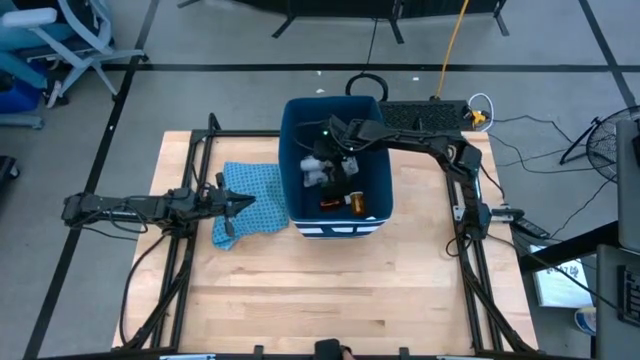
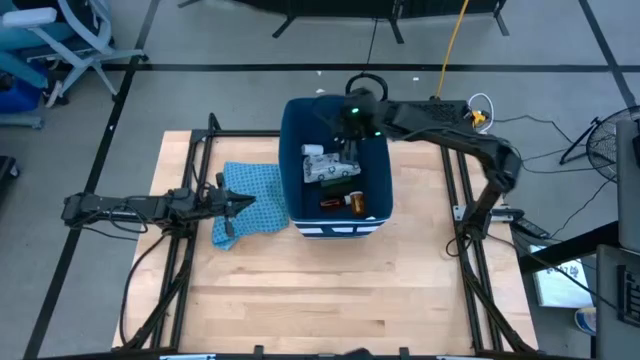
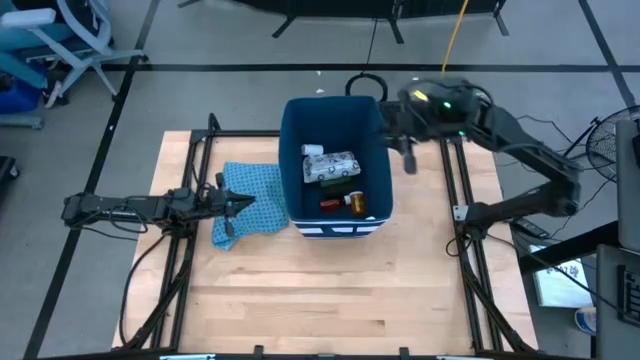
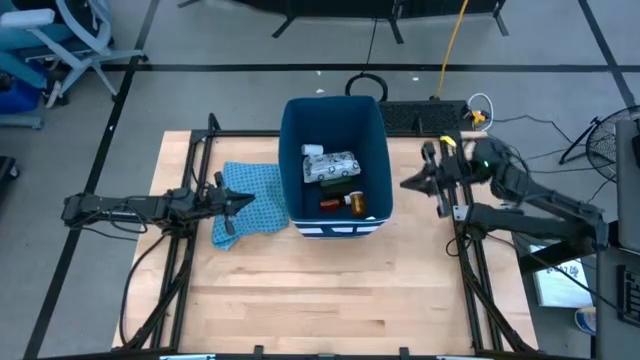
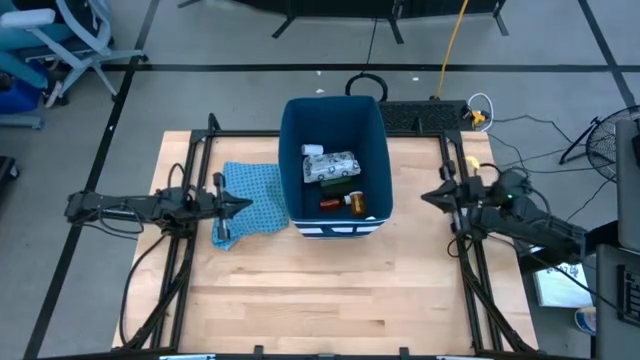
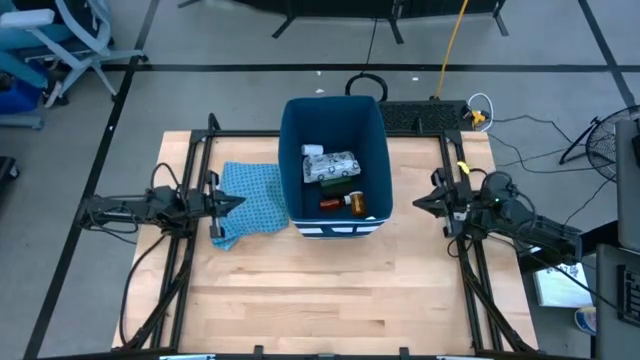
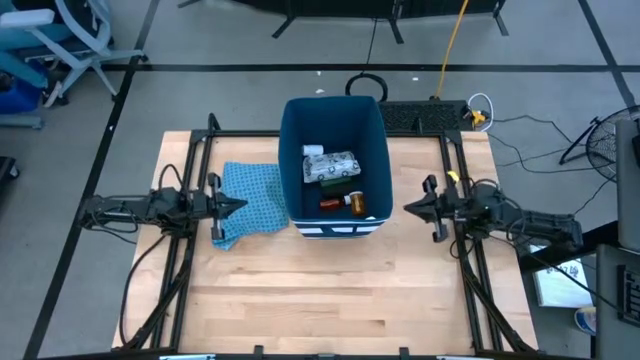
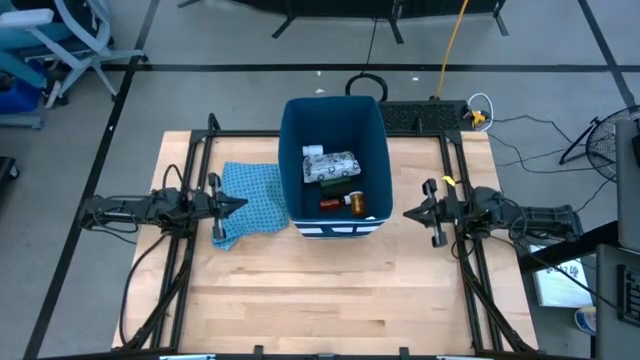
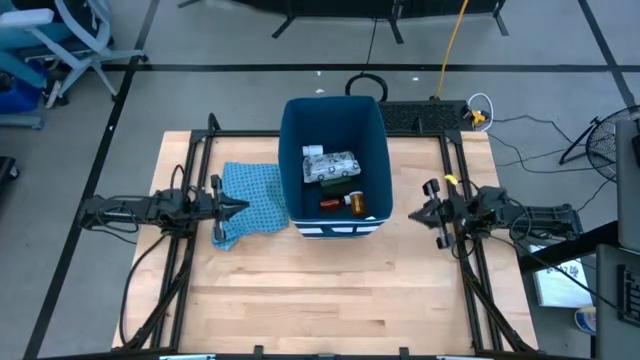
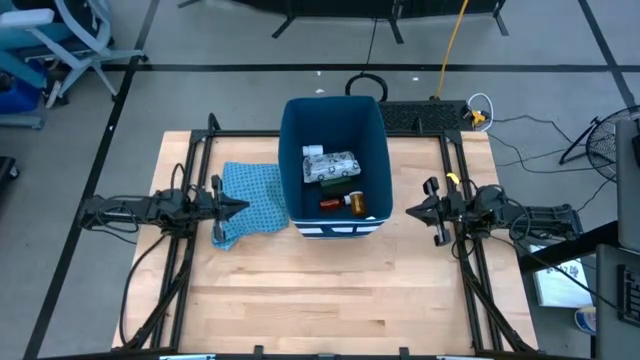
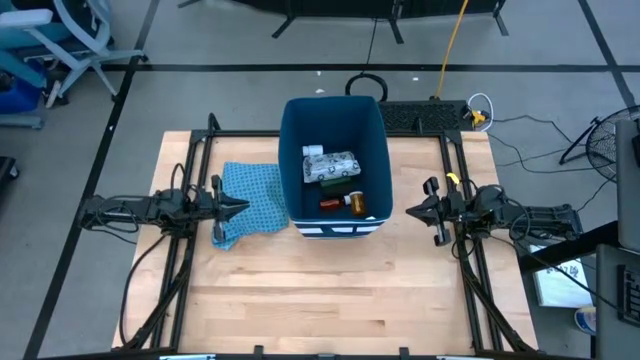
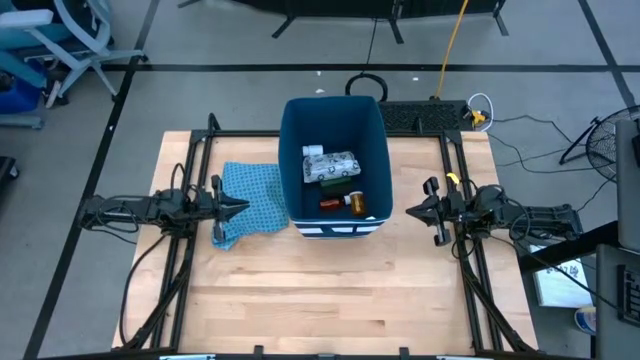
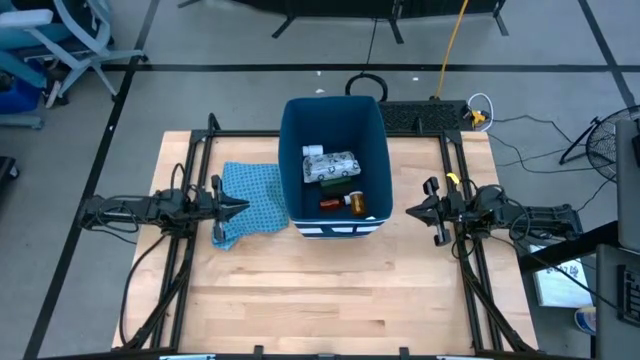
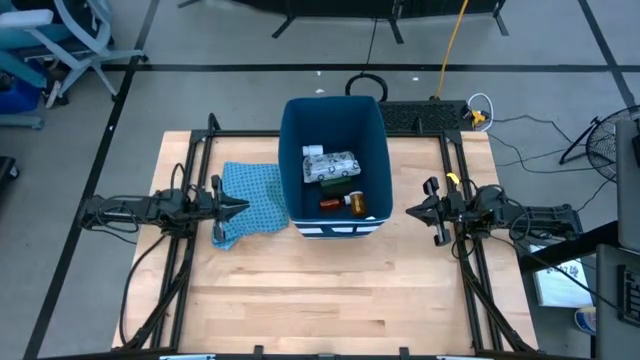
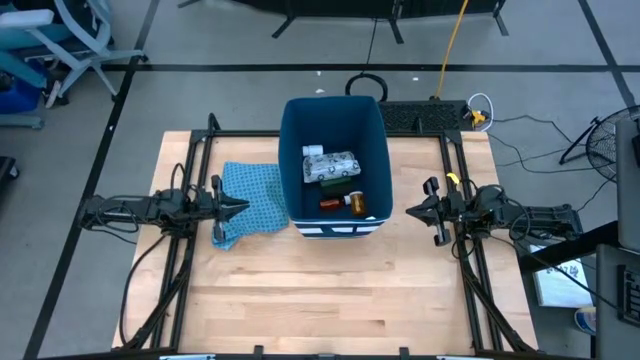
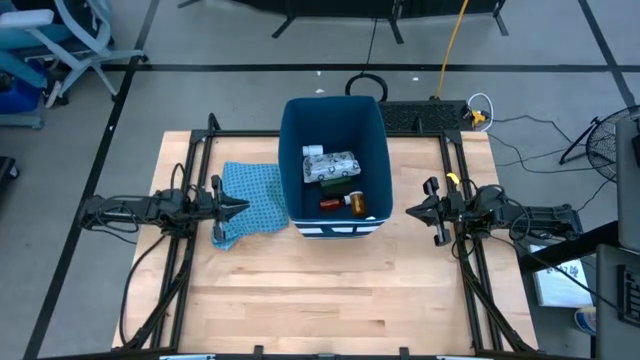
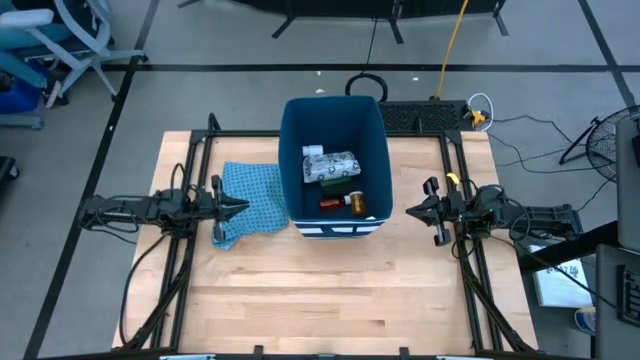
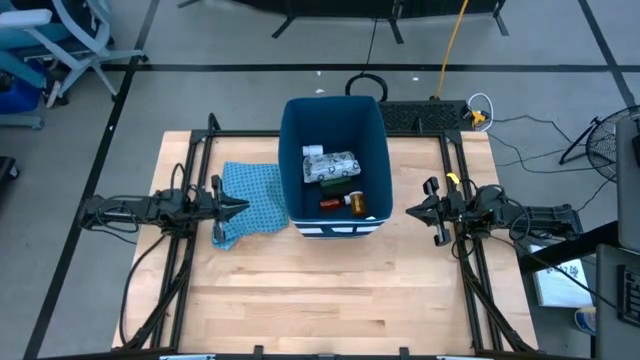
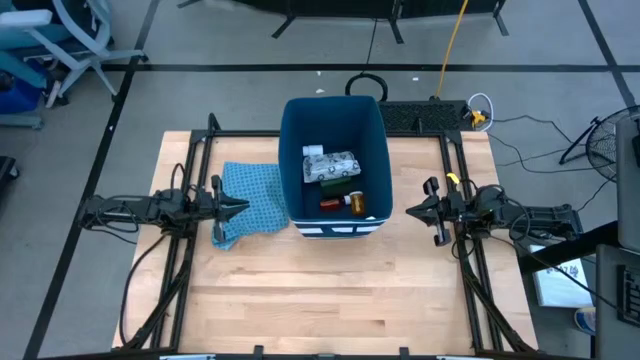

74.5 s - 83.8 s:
Task: Pick & place medical supplies in basket/bin
Return to Home Position

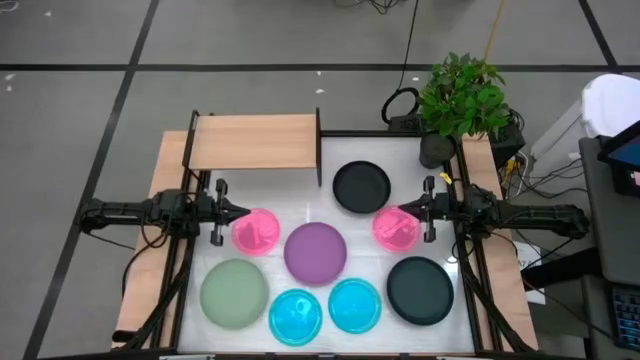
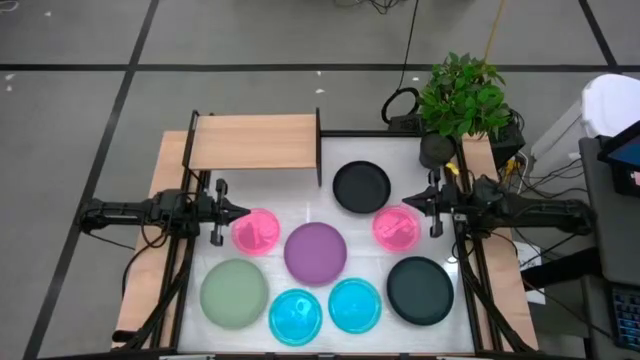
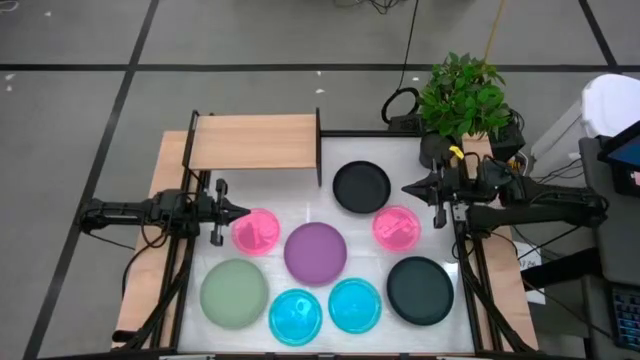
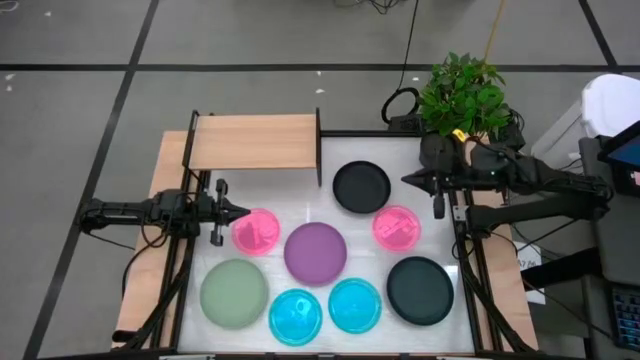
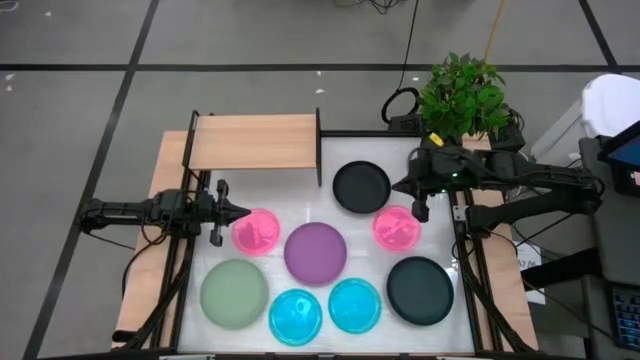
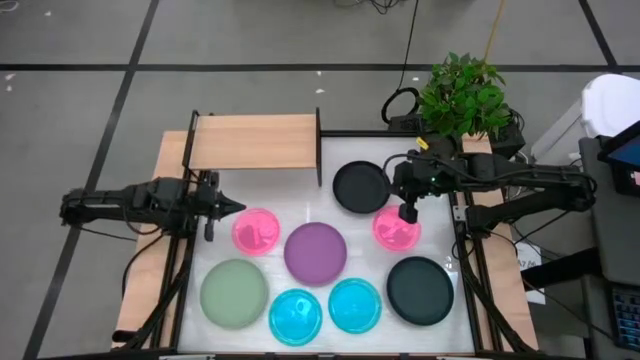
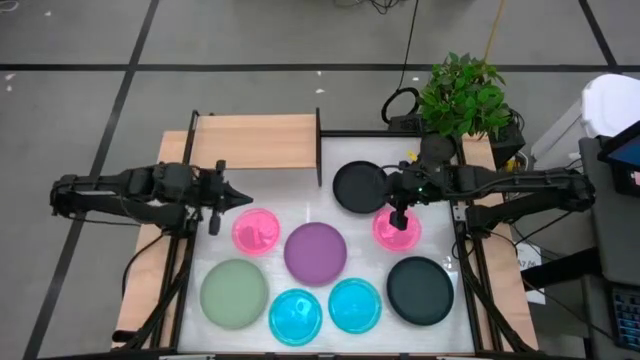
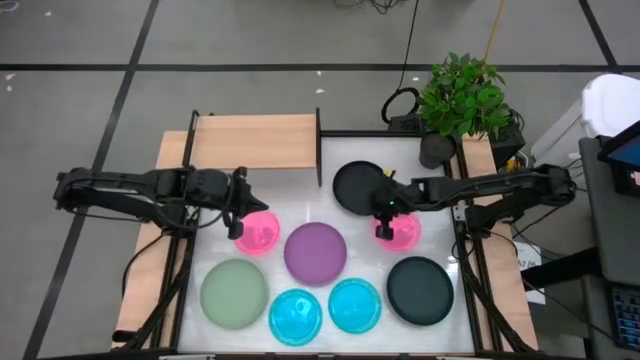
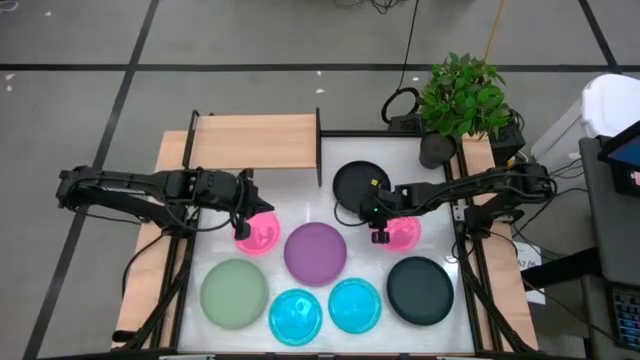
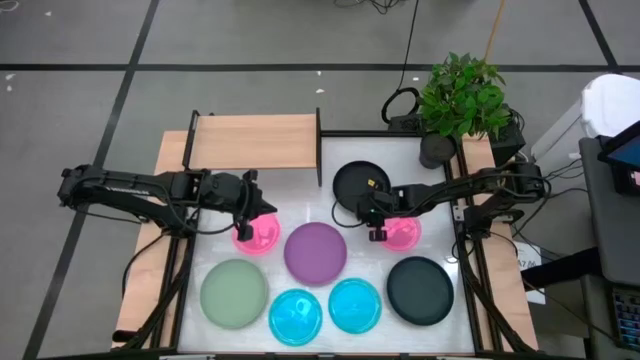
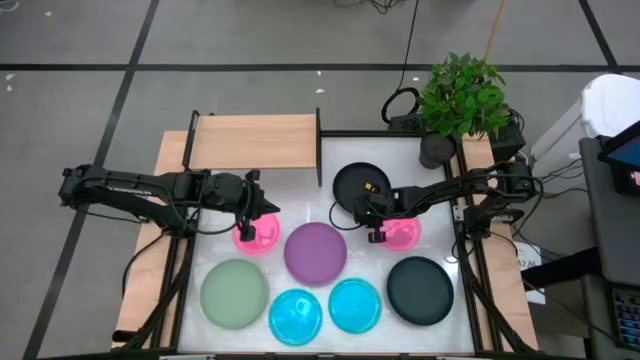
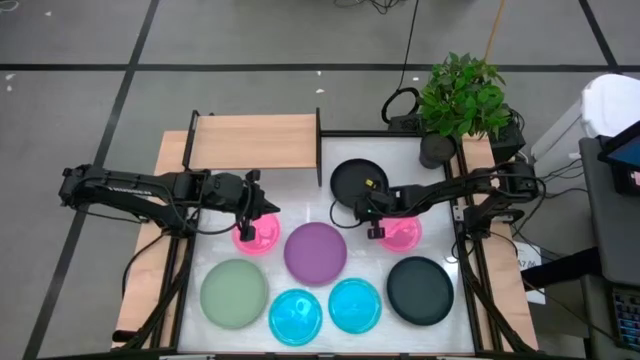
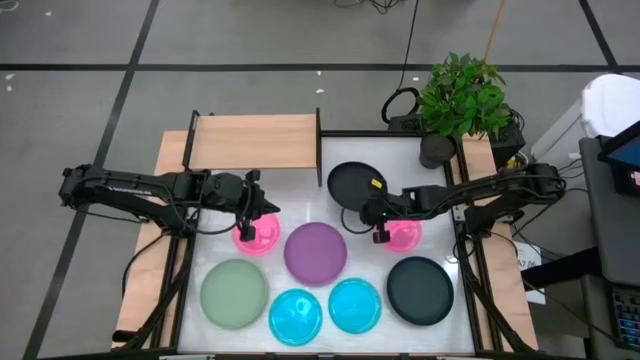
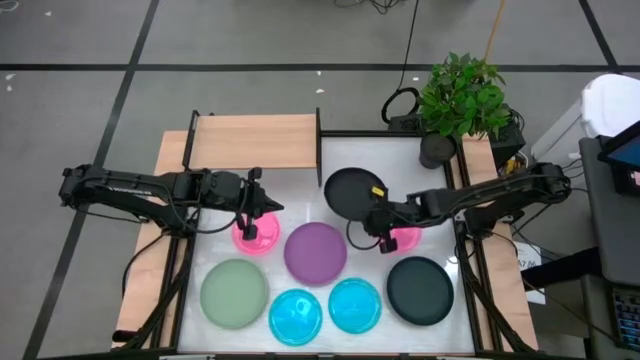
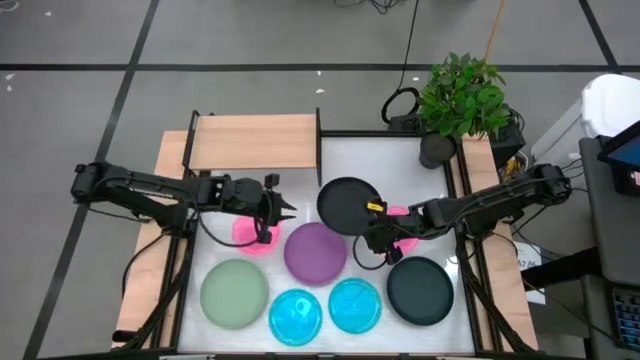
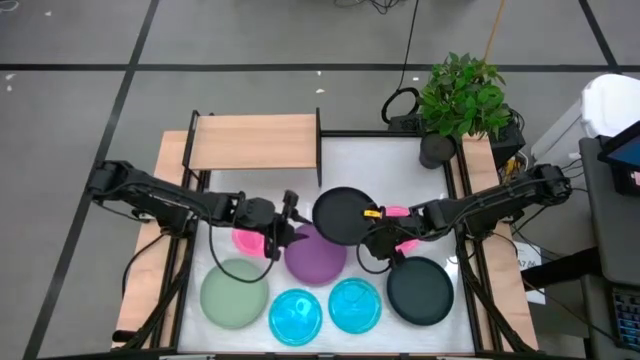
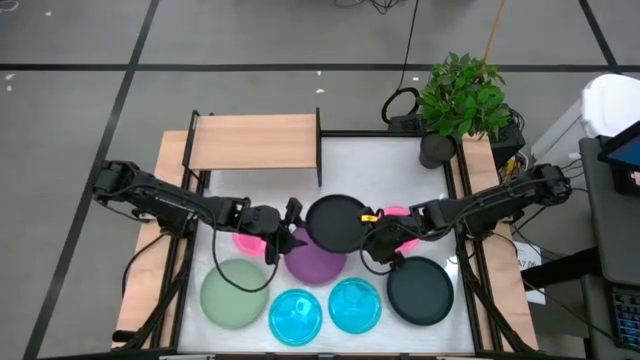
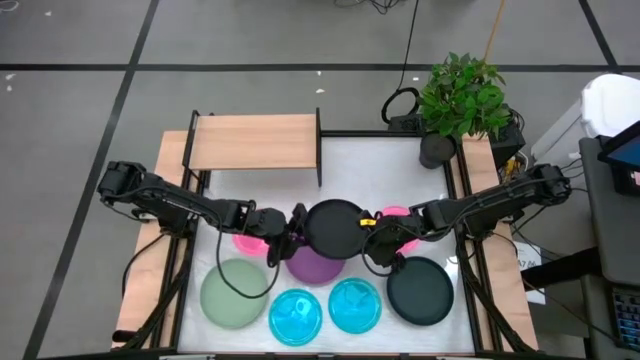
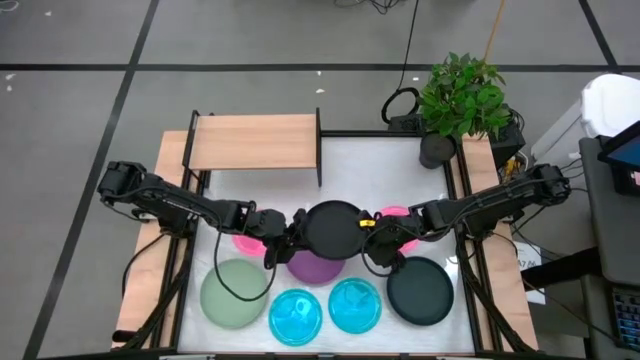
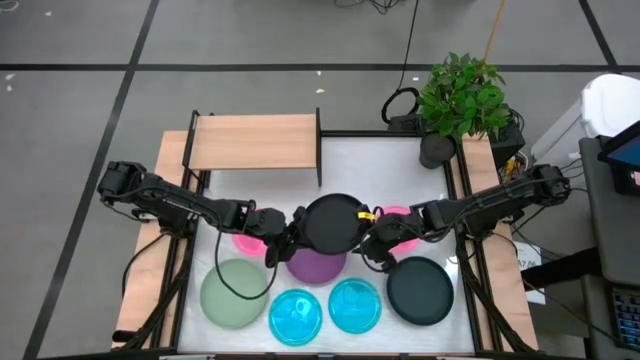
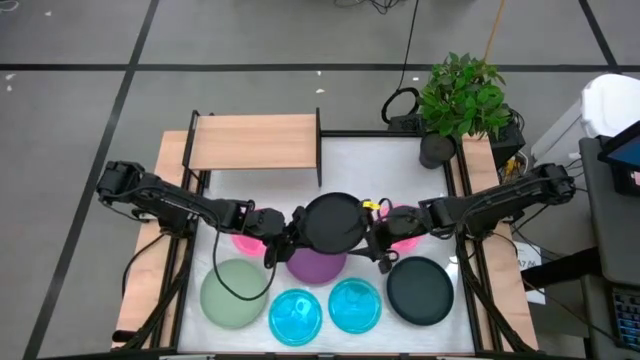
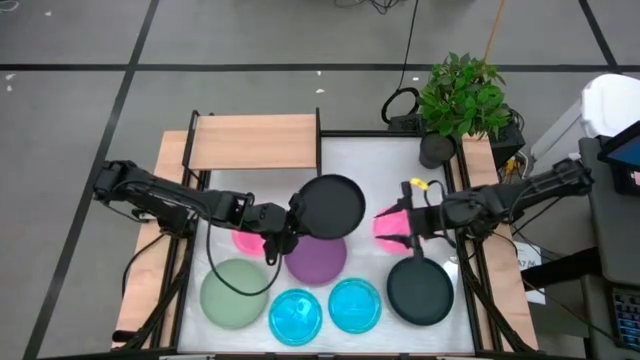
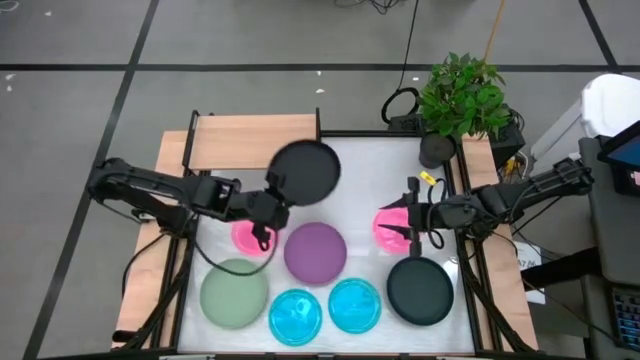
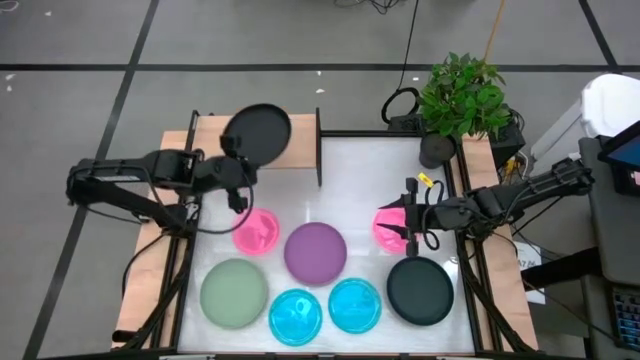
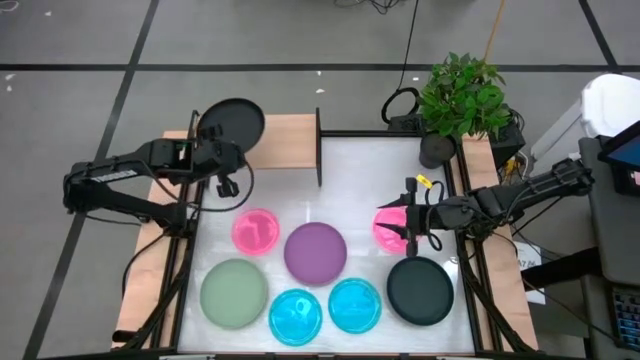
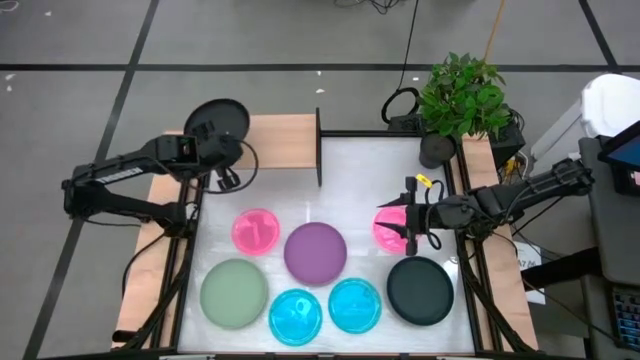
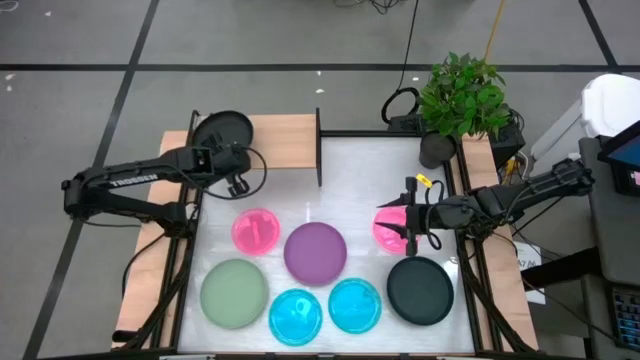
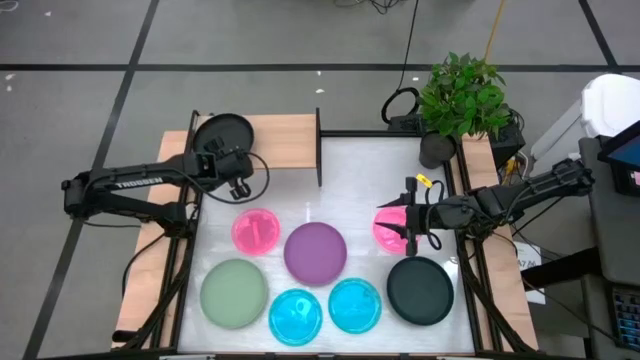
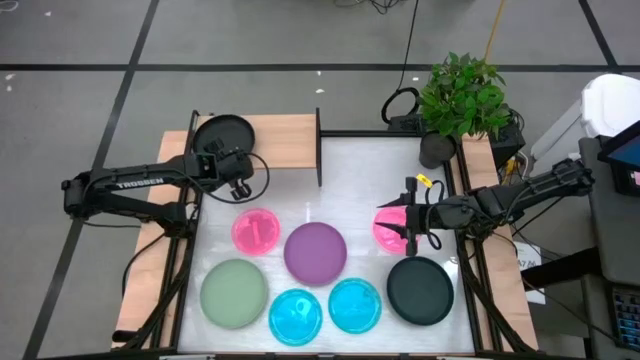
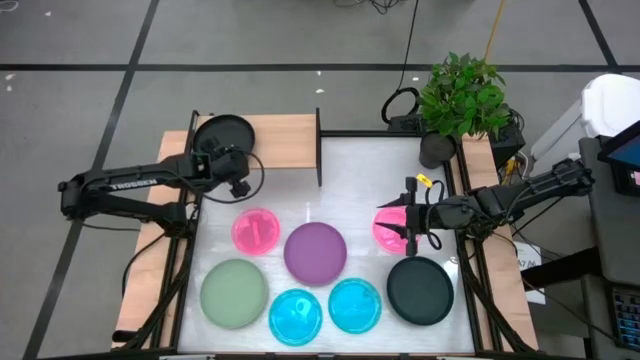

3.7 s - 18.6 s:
Task: Place and stack plates onto a shelf
Put the top black plate on the shelf
